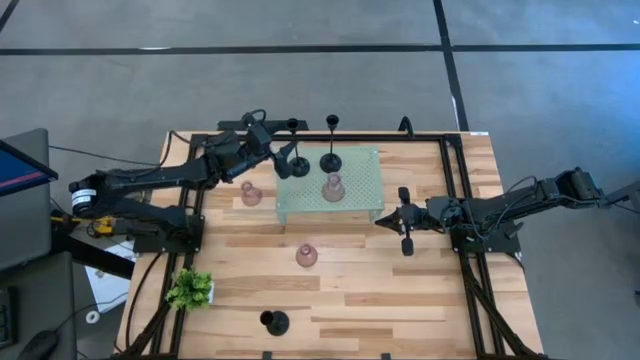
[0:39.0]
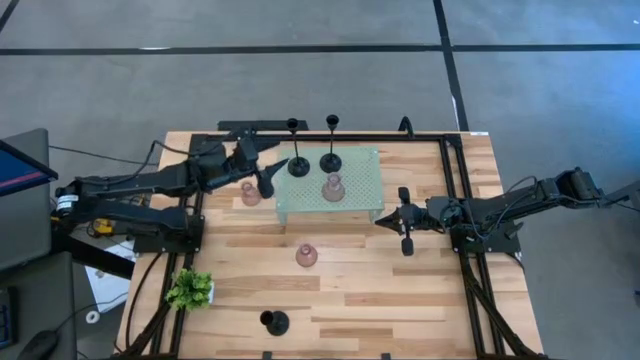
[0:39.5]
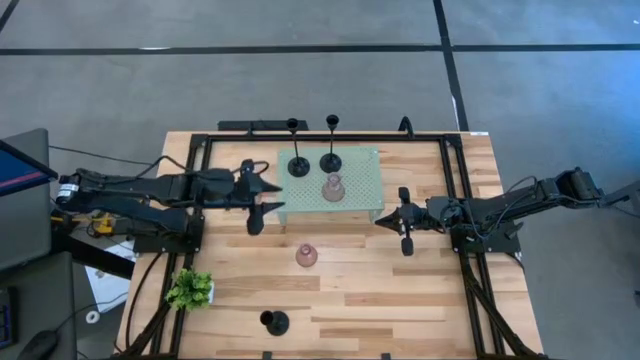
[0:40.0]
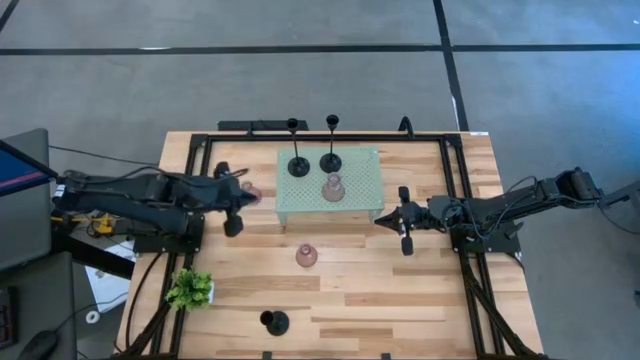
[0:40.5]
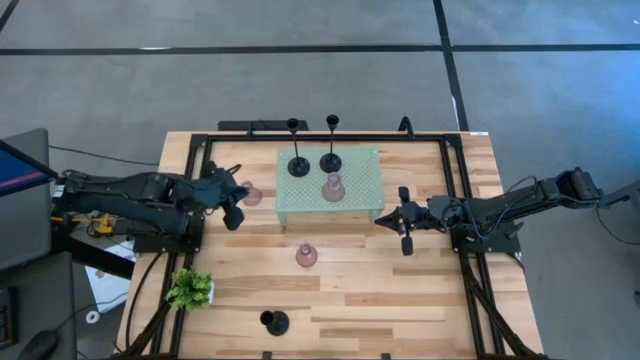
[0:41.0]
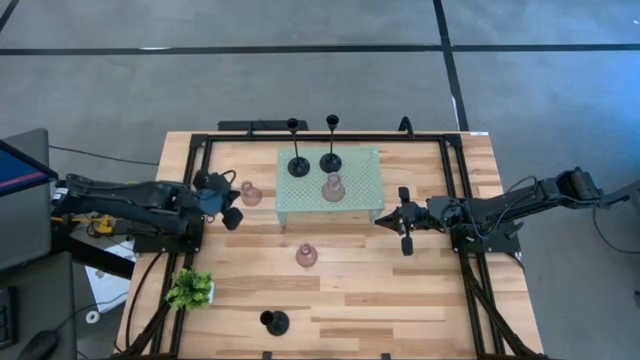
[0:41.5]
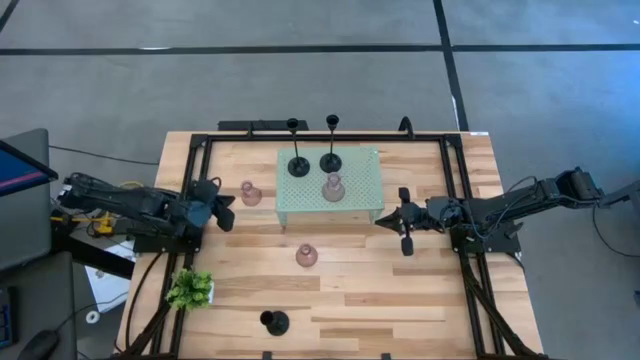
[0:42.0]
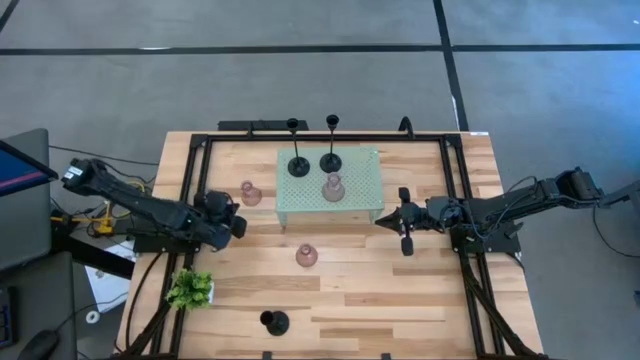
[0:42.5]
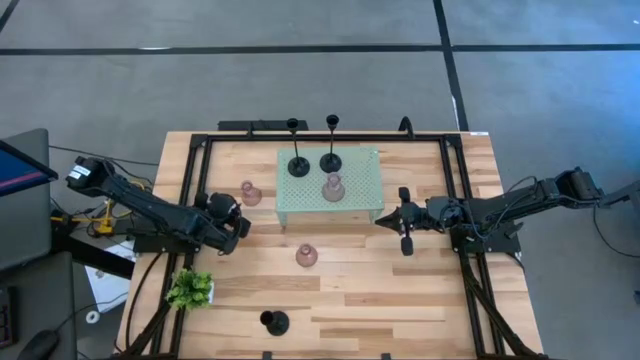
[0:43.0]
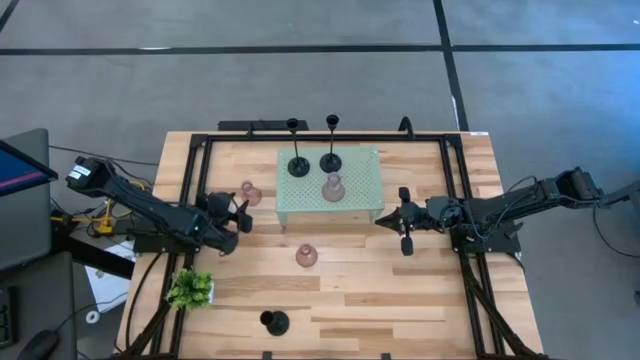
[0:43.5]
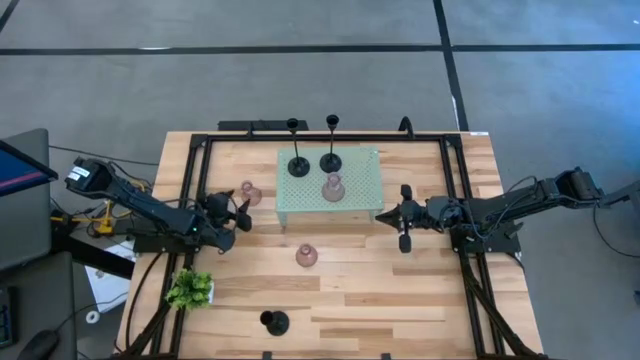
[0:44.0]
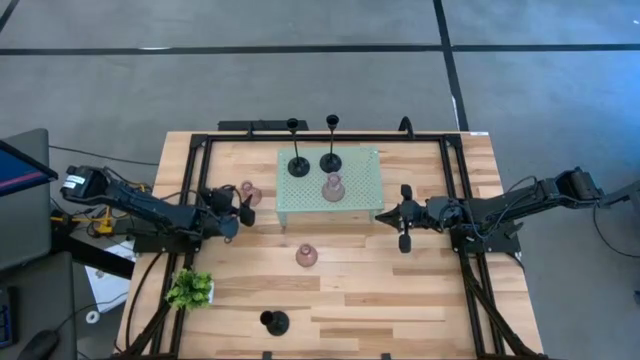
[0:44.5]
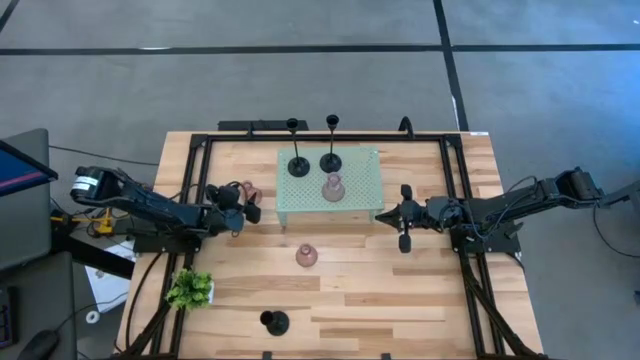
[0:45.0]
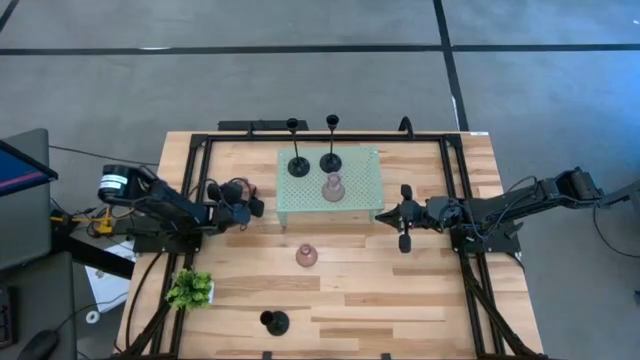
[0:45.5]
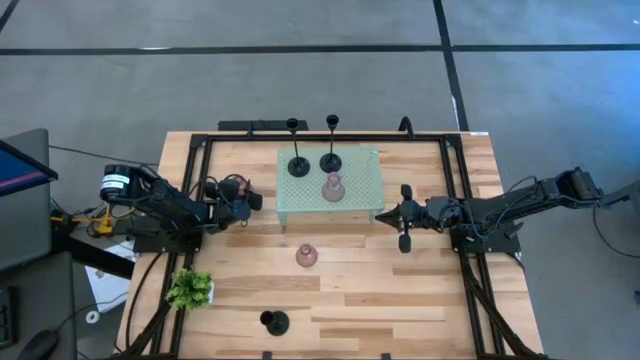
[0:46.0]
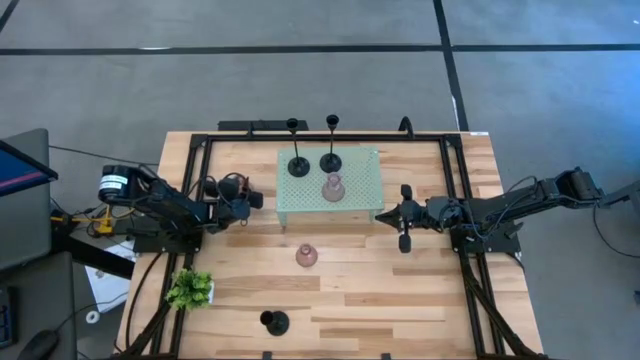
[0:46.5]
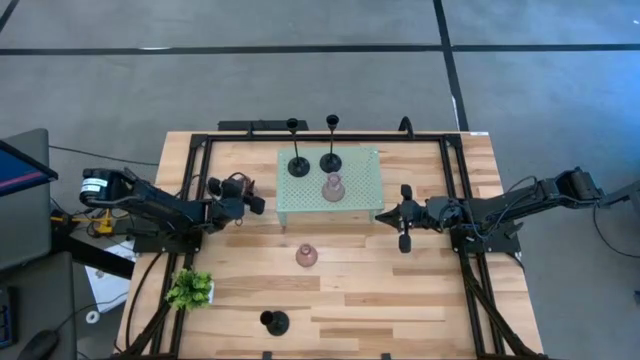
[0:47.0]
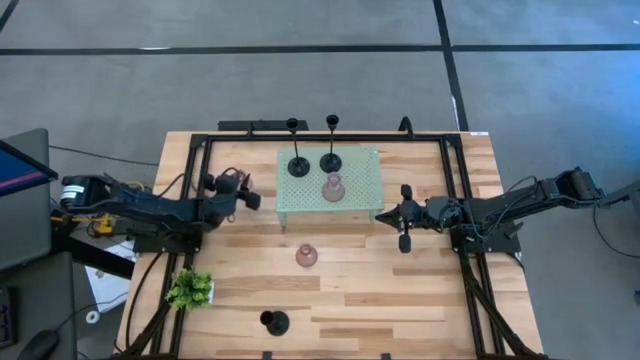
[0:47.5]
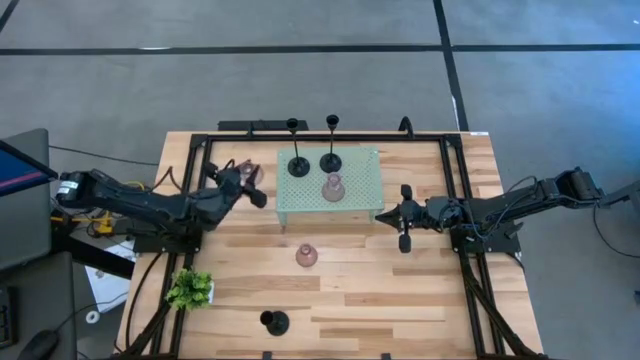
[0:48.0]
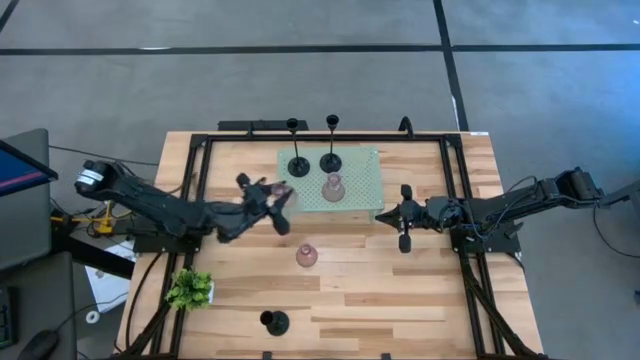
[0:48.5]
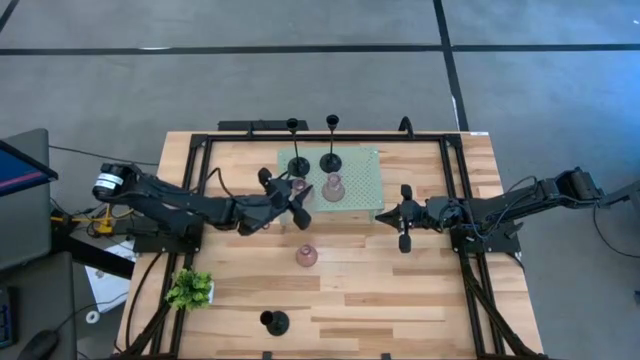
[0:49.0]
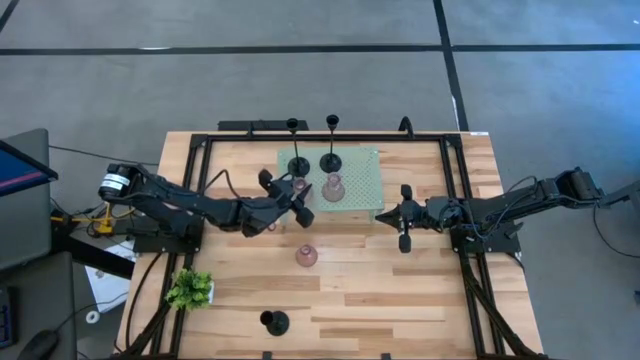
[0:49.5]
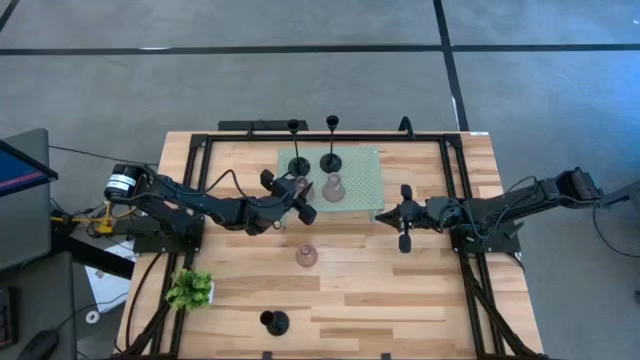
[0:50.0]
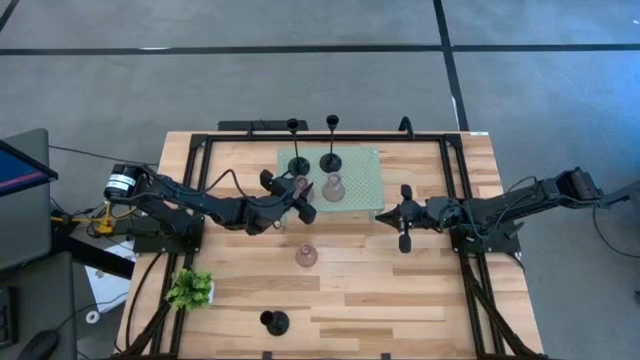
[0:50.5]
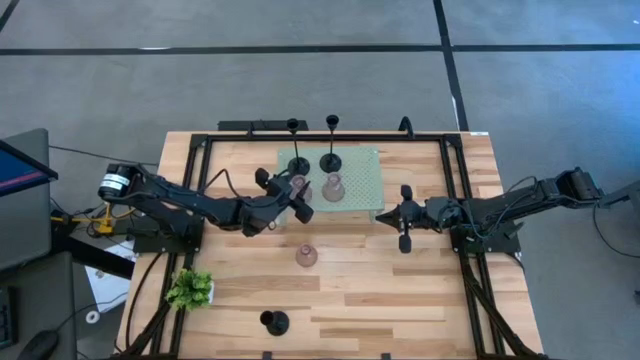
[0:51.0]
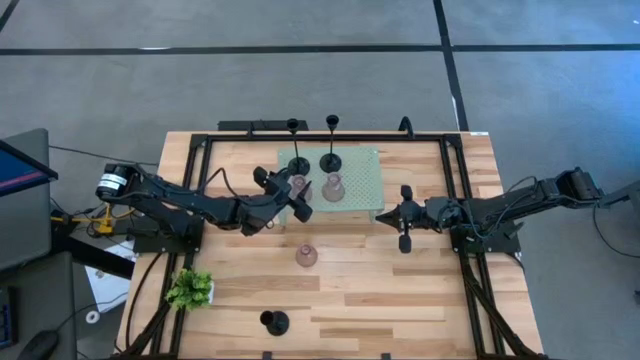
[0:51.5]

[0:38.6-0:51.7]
Task: Pick & Place candle stick holders
Put the top pink glass candle holder on the shelf

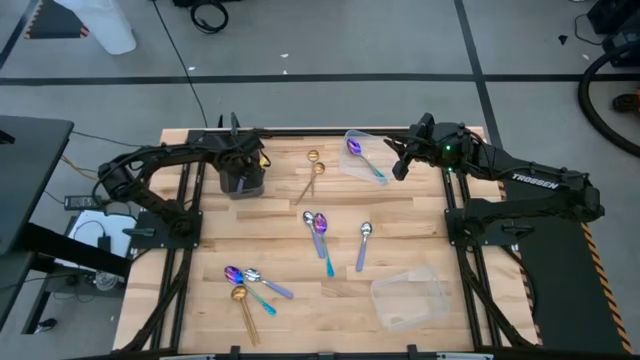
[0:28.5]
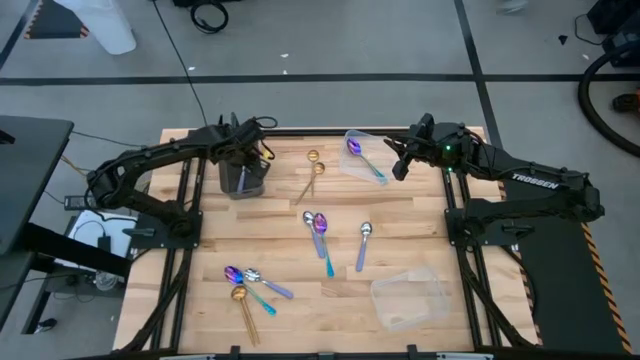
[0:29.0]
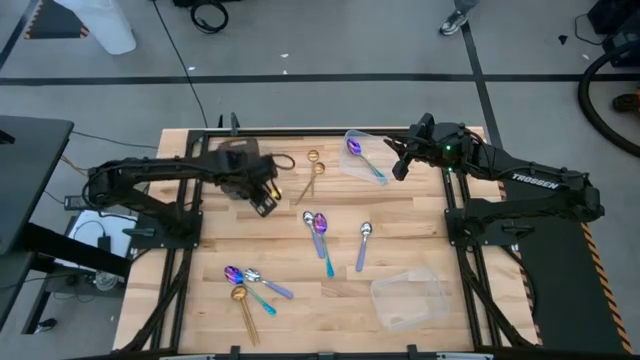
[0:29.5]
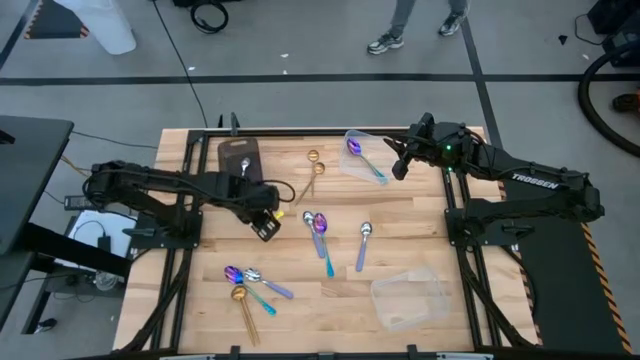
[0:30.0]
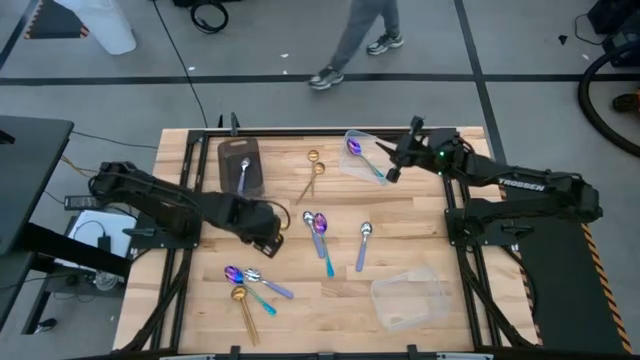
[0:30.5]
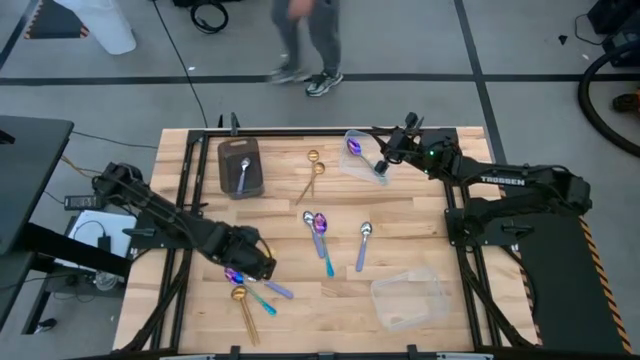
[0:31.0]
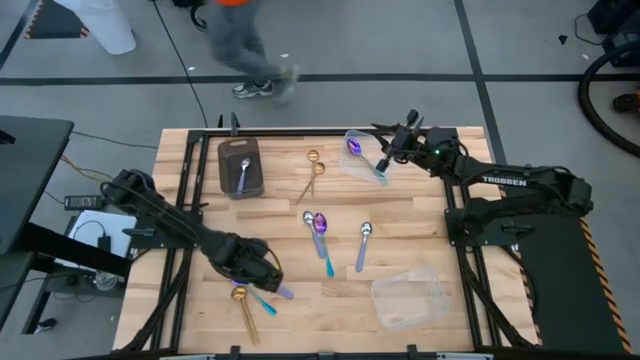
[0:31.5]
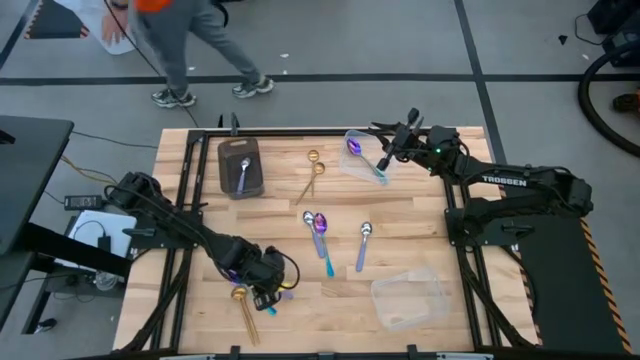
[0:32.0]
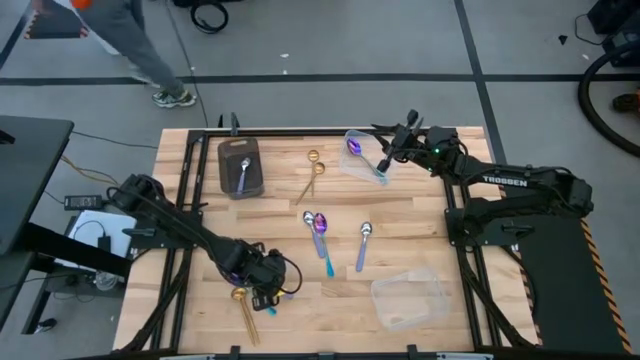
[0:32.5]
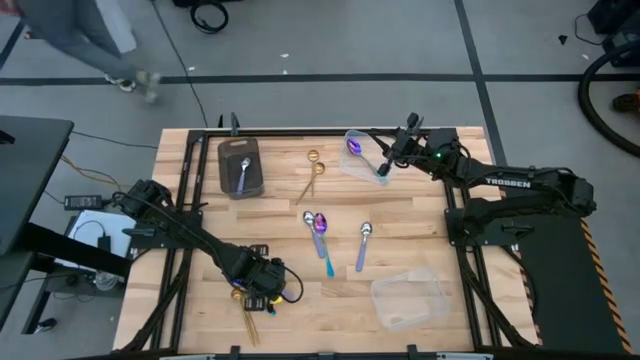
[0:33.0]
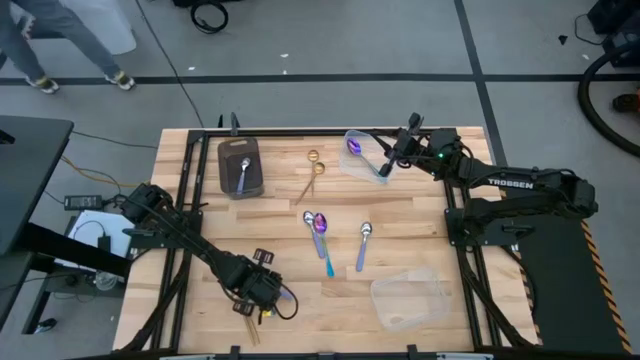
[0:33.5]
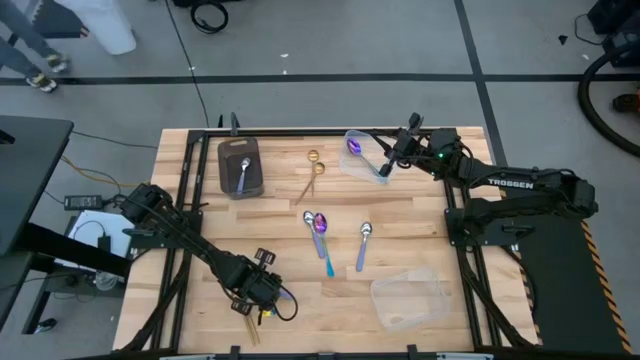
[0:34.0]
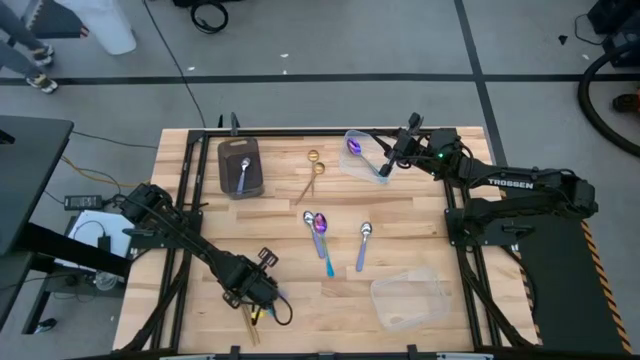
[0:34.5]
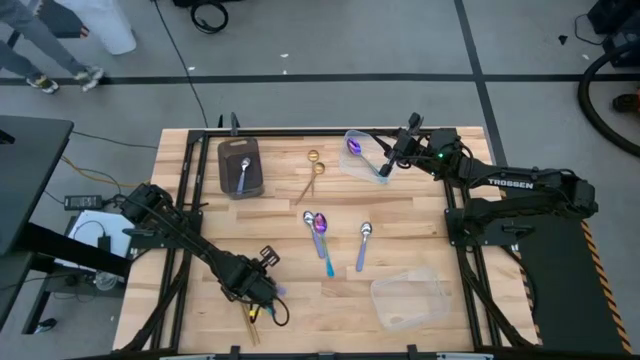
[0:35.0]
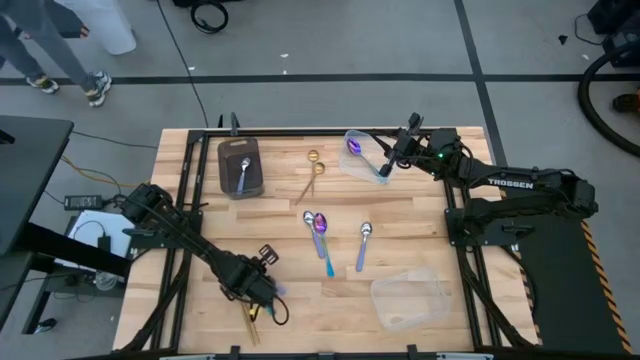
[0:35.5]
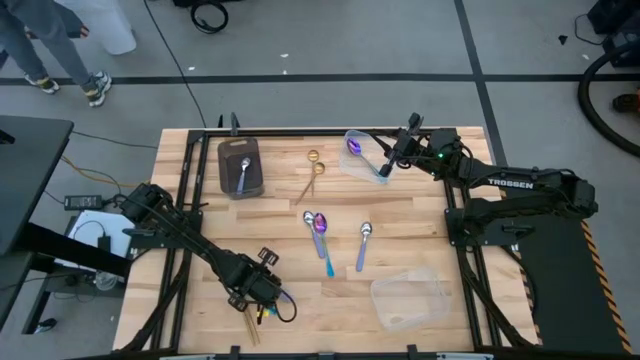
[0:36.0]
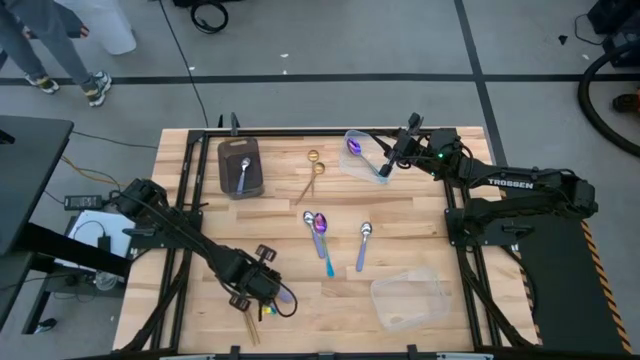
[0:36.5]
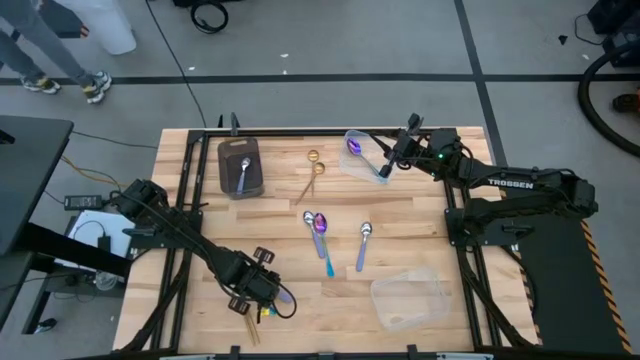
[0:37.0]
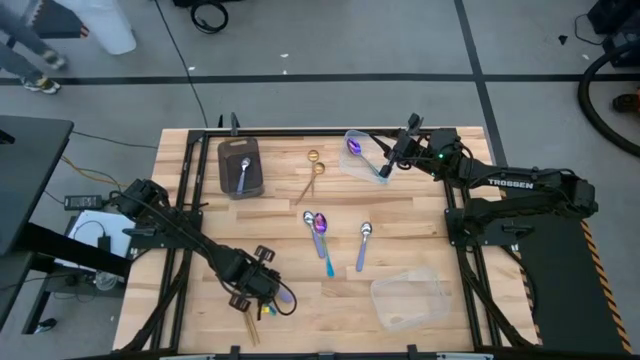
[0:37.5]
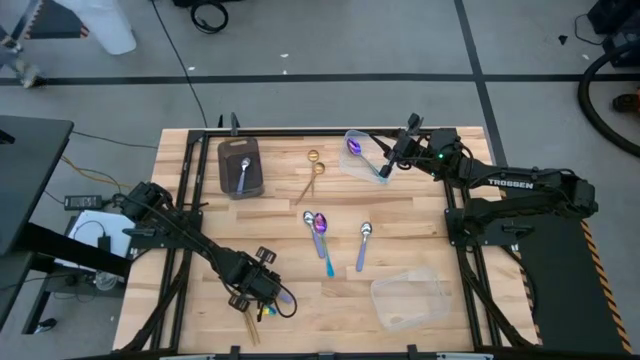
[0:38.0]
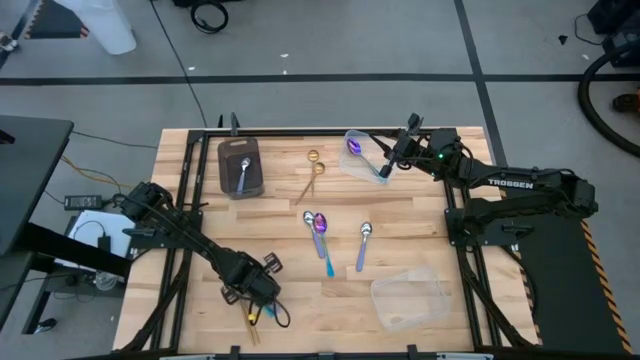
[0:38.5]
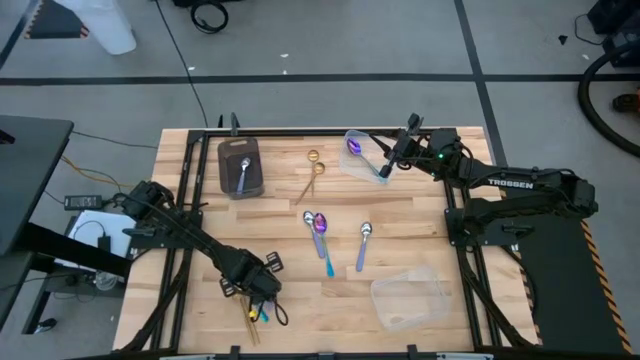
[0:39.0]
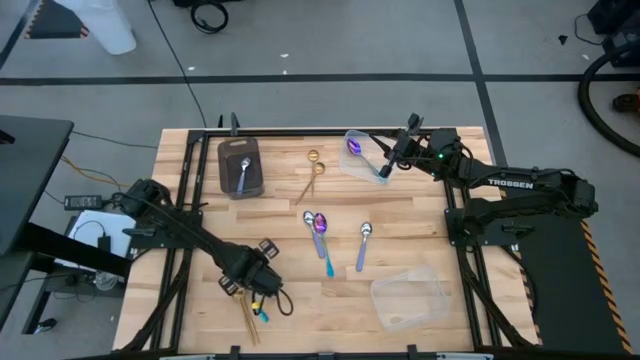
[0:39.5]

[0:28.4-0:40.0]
Task: Sort silverware by color (type)
Put the purple spoon into the black bin
